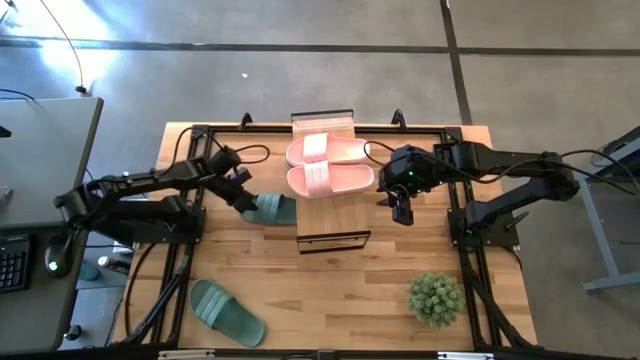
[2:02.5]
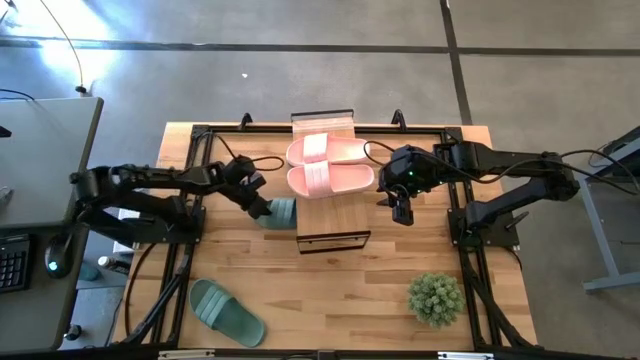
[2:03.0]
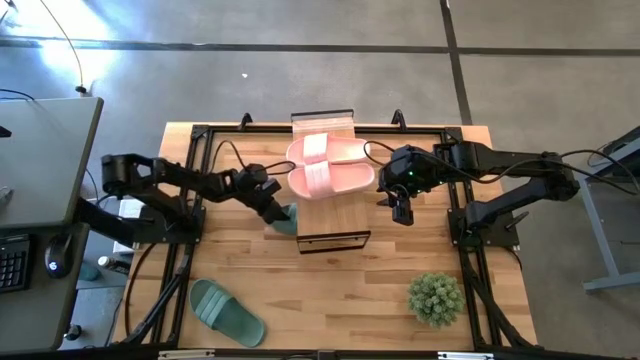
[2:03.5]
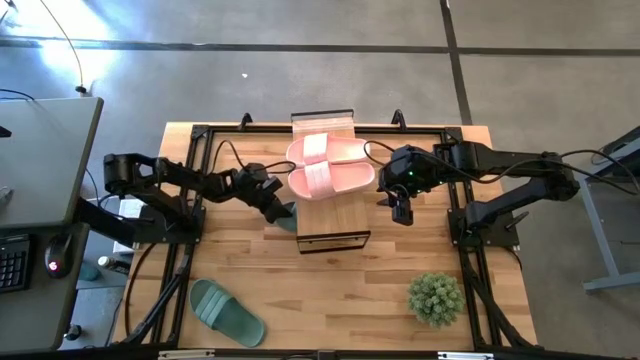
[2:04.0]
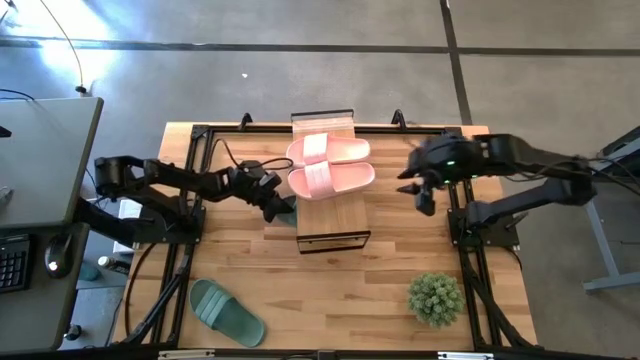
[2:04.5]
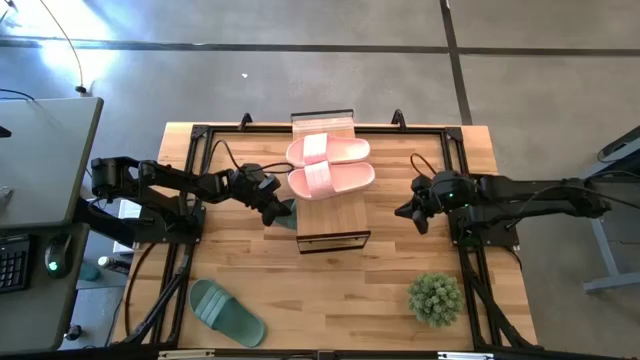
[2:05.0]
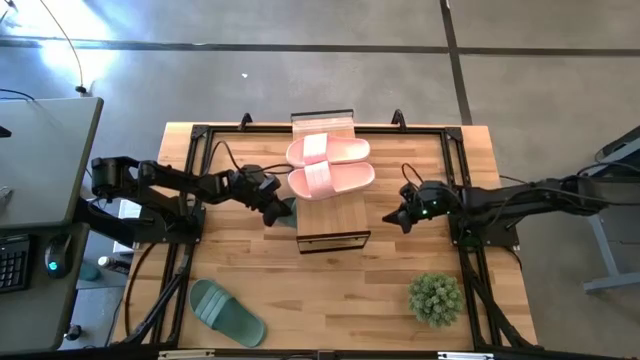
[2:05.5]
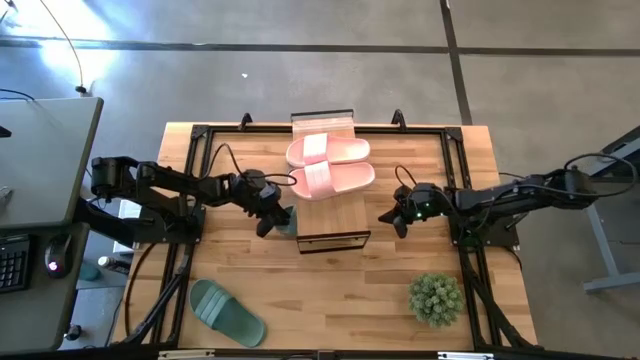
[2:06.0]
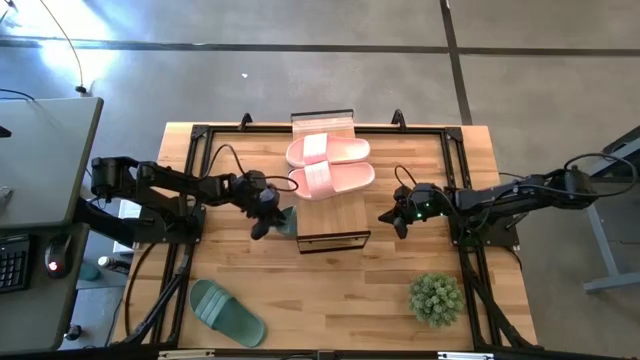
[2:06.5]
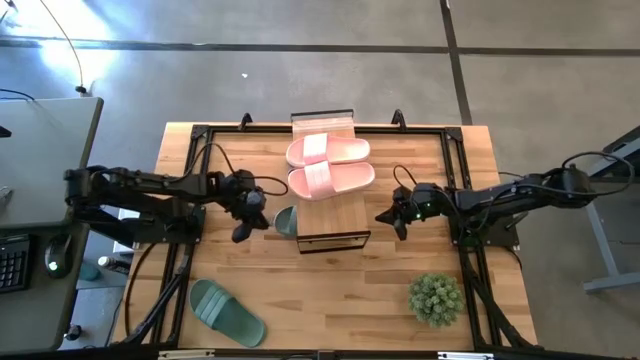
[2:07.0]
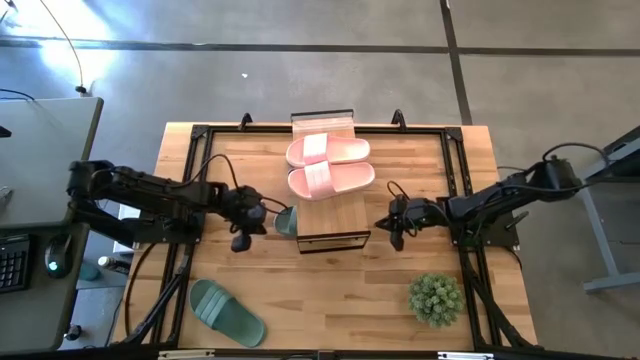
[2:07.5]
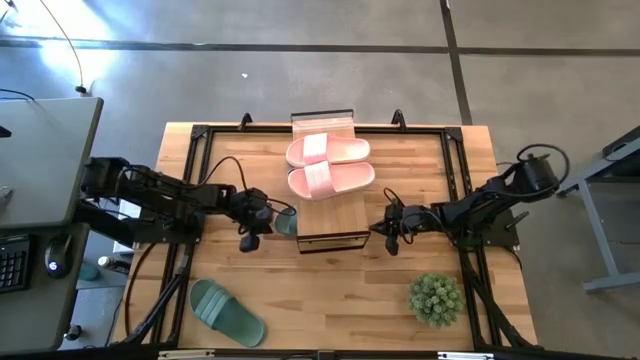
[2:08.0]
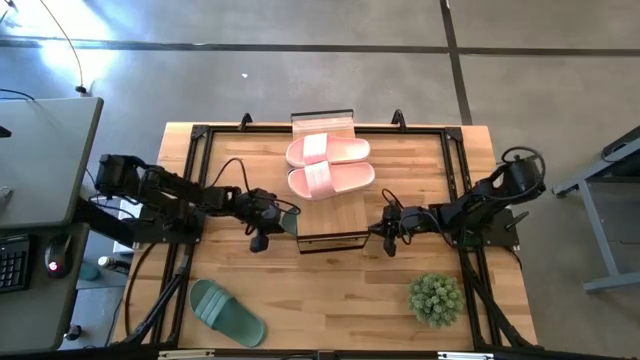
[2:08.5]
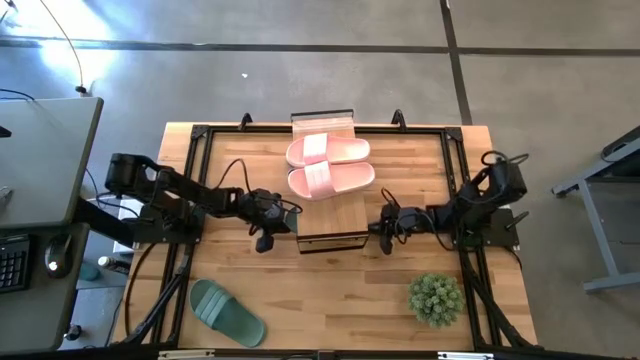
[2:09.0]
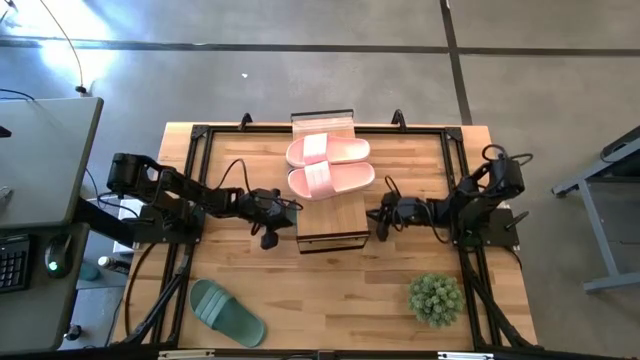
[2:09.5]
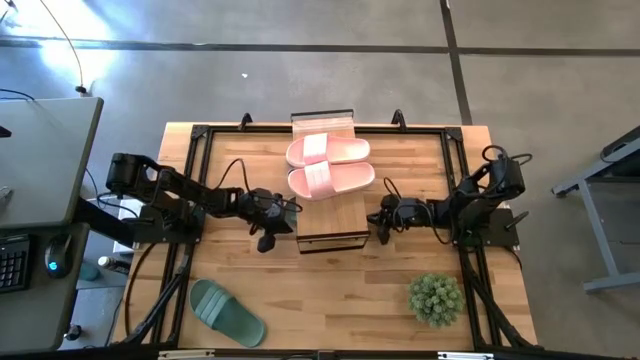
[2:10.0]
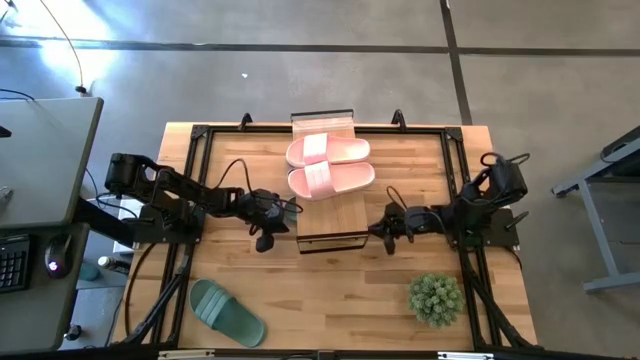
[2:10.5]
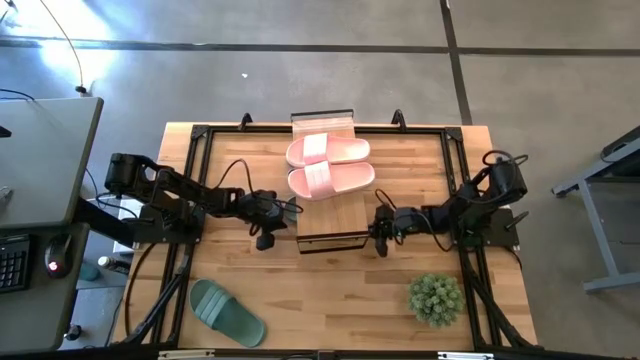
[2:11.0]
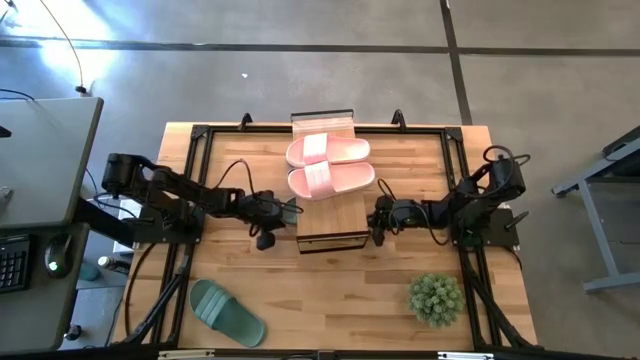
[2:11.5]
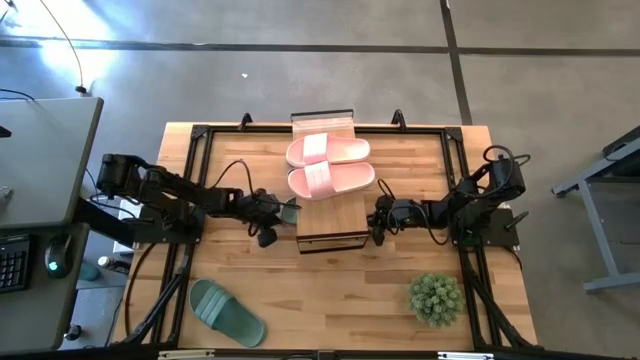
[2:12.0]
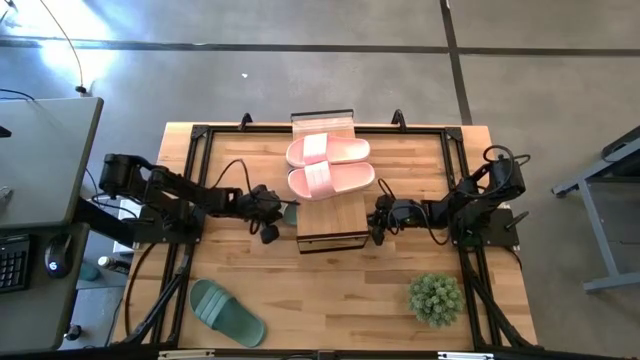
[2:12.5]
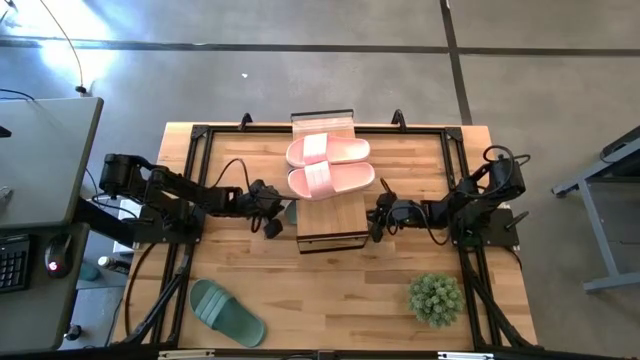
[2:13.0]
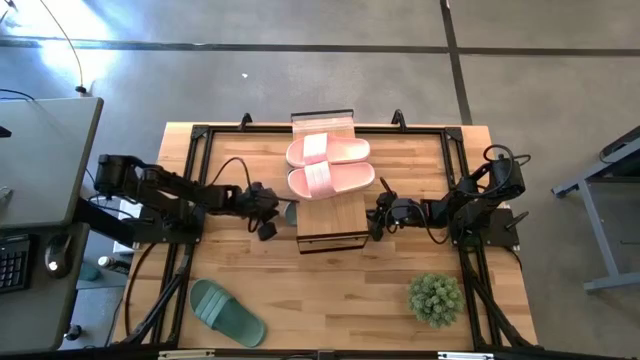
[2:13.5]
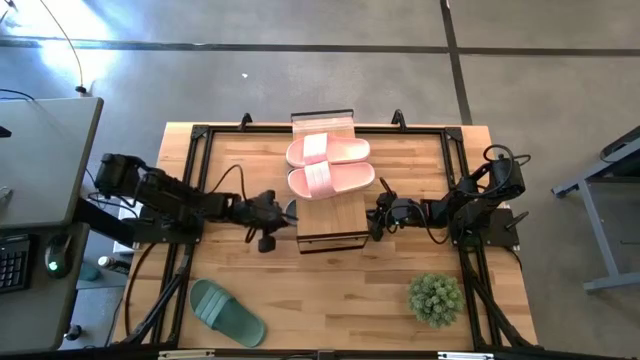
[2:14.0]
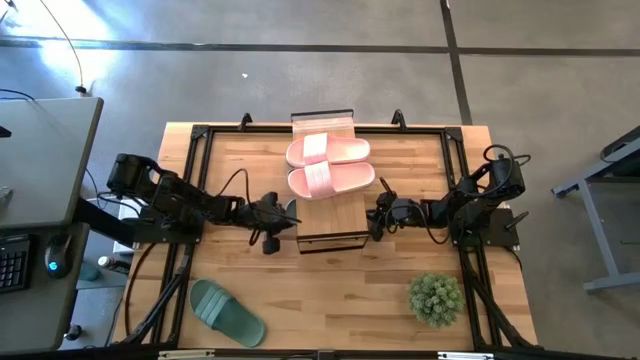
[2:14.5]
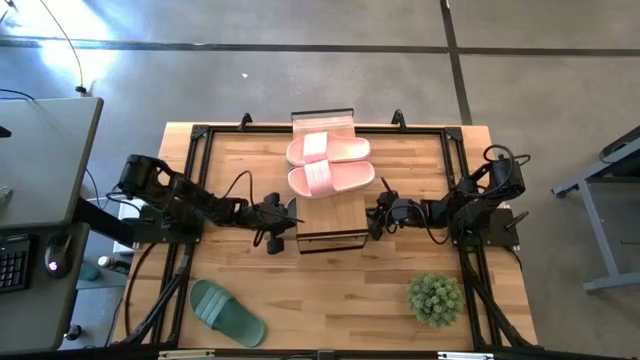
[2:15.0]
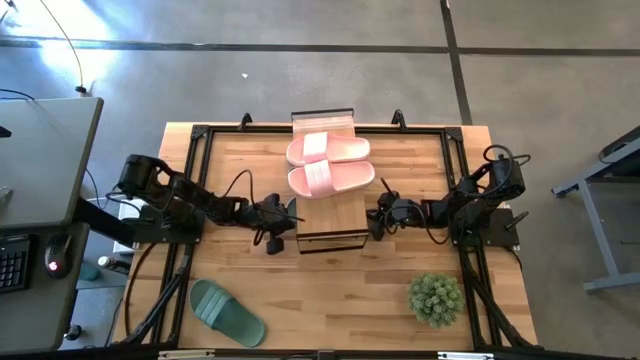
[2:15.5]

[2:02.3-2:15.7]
Task: Pick and place slides into the shelf
Put the green slide under the shelf

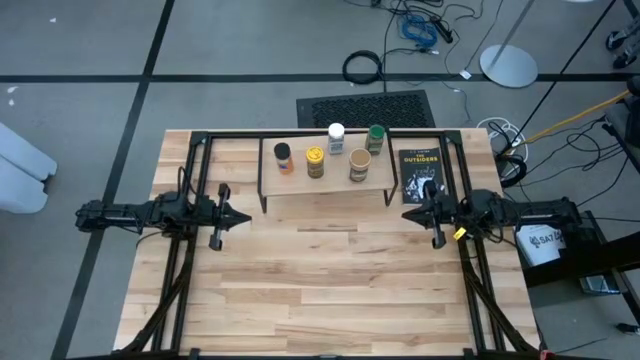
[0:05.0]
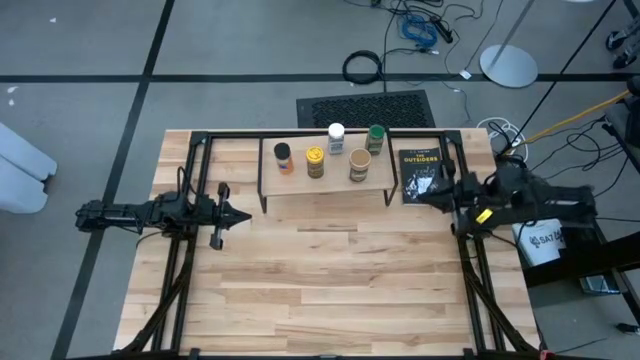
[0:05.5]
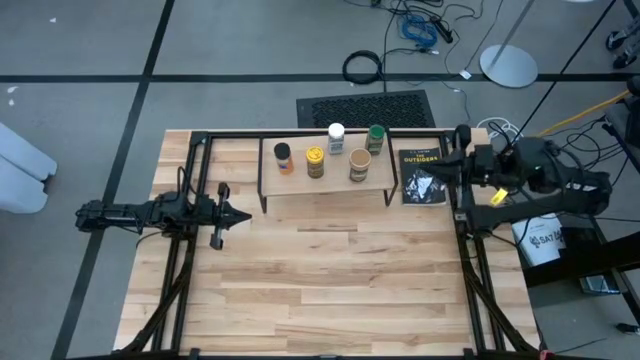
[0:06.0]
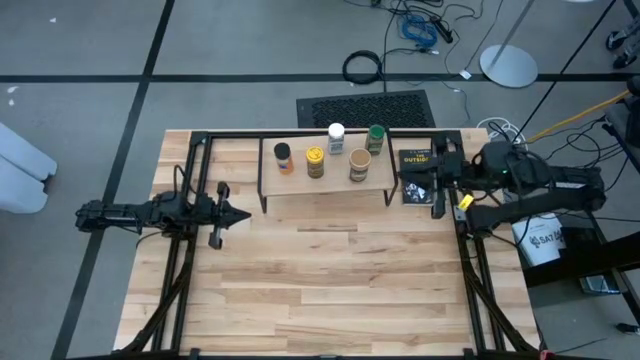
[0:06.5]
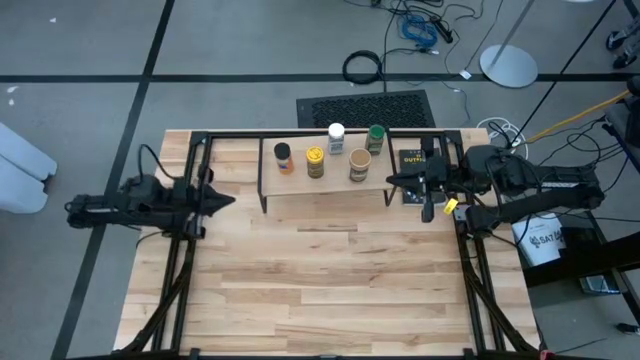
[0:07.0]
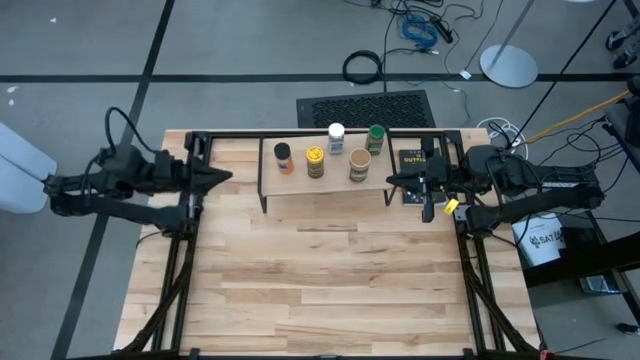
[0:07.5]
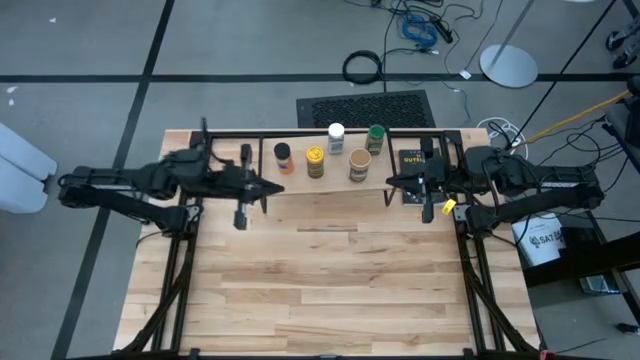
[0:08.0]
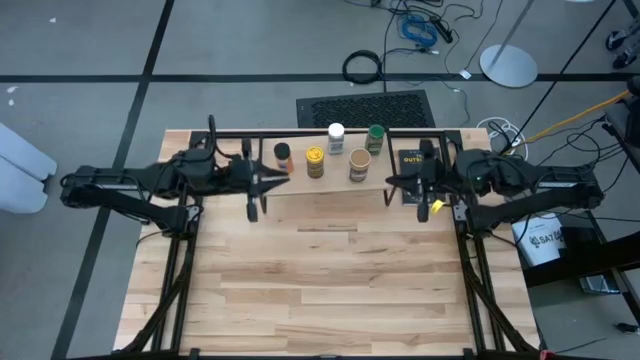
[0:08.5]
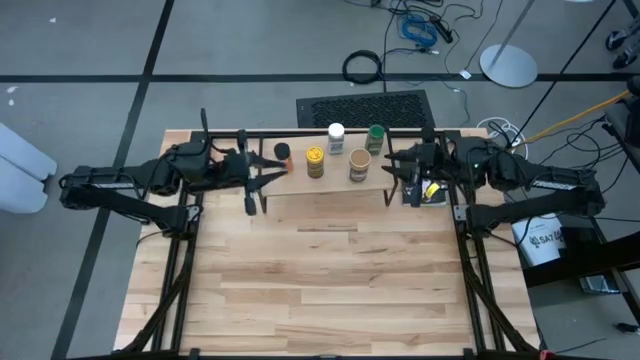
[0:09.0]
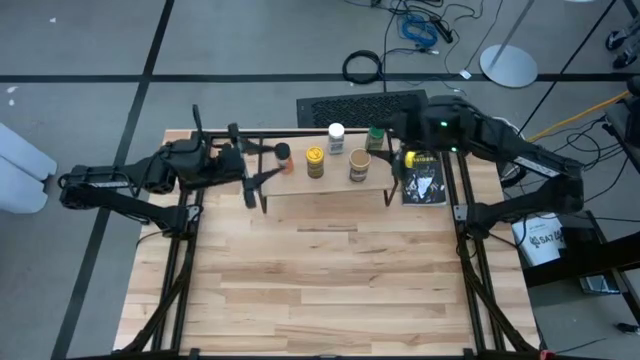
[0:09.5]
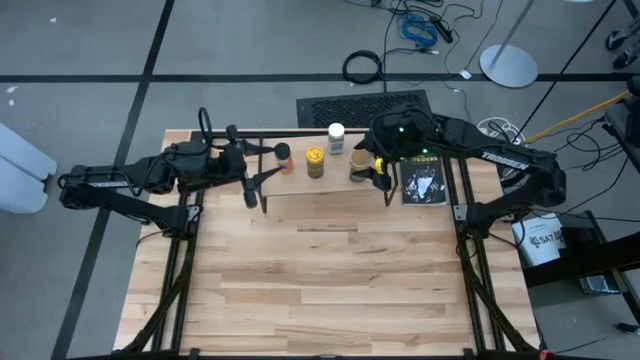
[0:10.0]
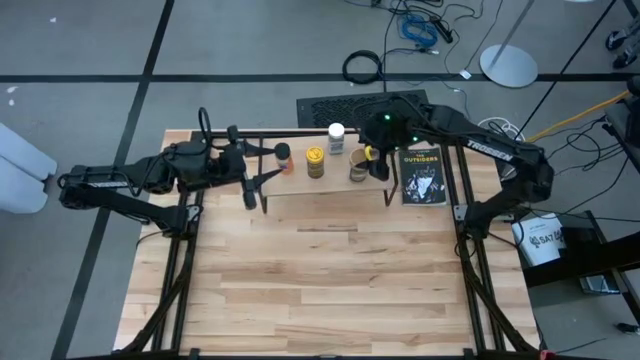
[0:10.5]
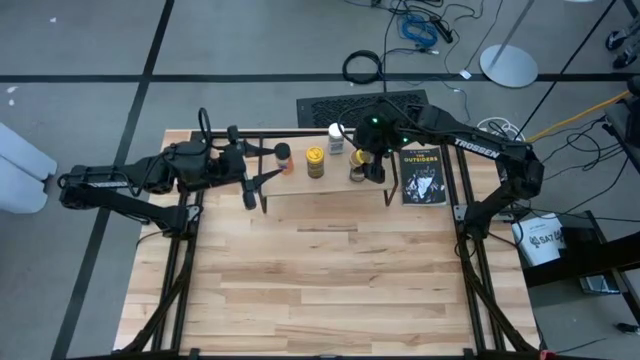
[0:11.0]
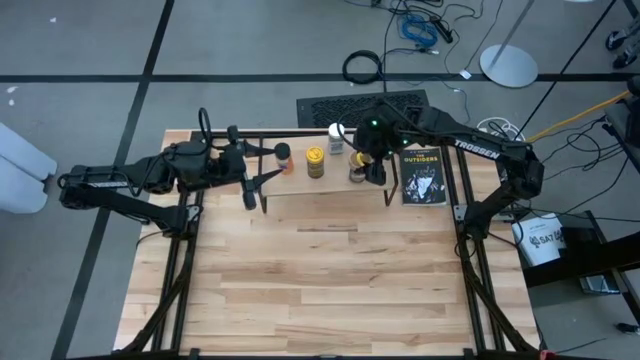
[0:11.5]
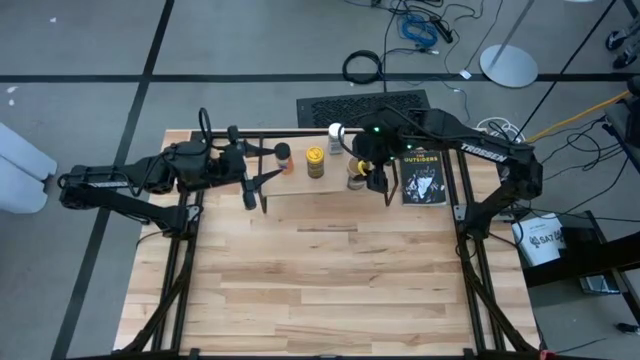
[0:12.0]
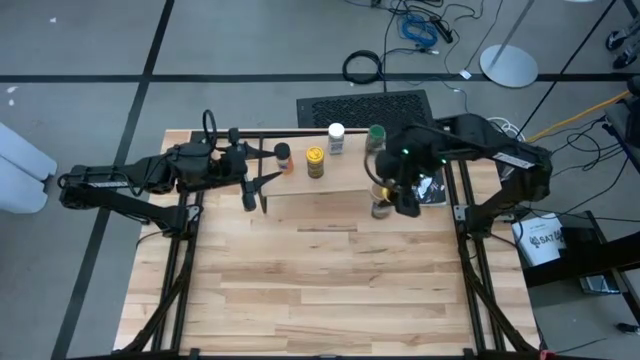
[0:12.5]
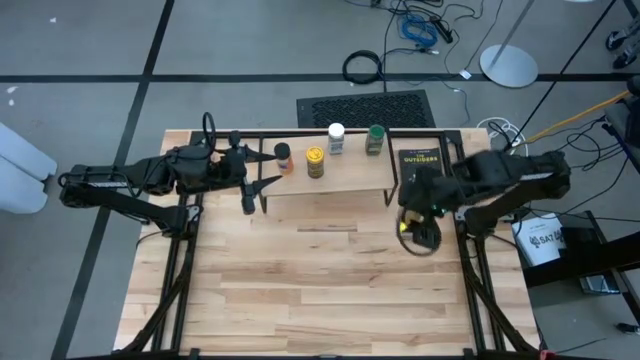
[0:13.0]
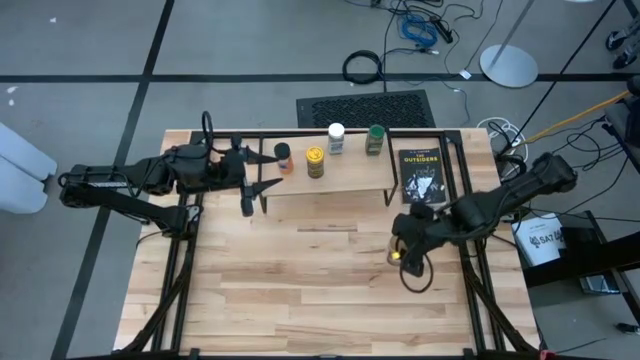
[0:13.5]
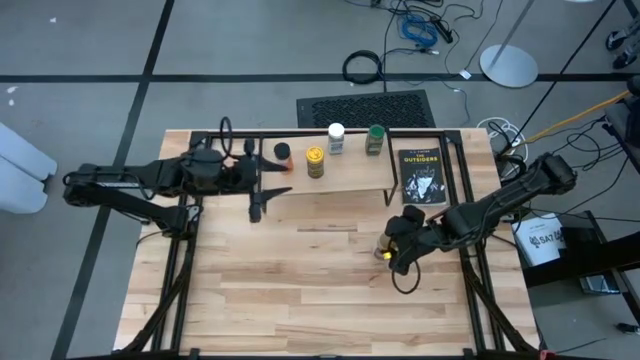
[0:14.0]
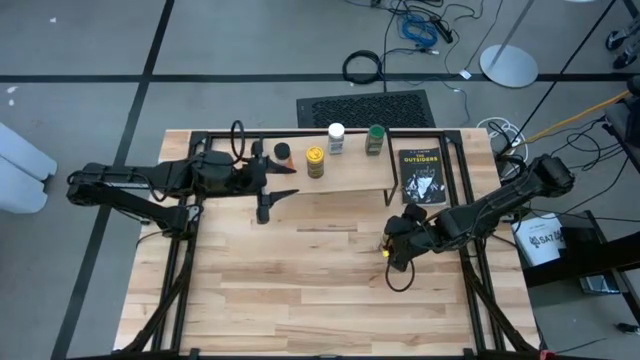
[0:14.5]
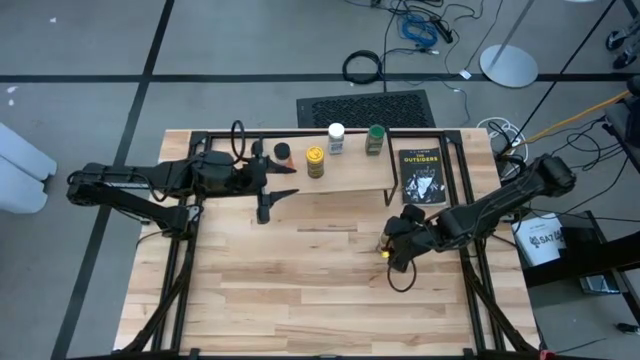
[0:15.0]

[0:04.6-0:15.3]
Task: Shelf spices
Remove the golden seasoning bottle from the shelf
